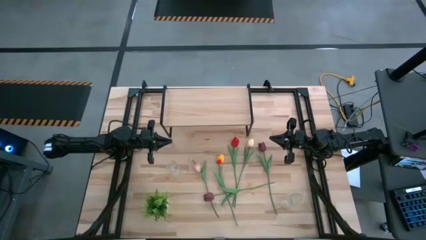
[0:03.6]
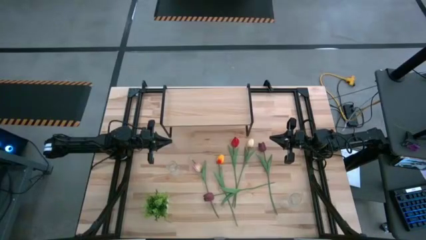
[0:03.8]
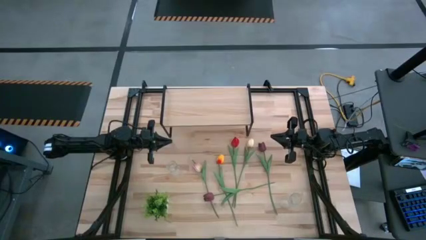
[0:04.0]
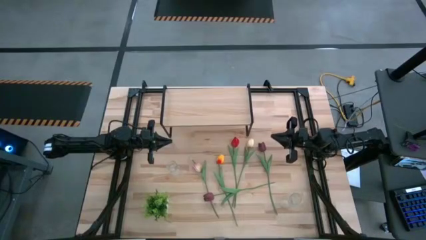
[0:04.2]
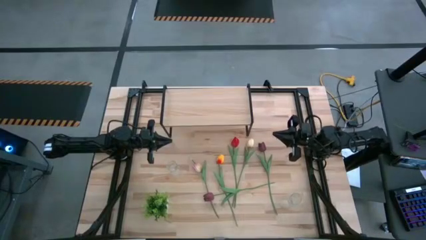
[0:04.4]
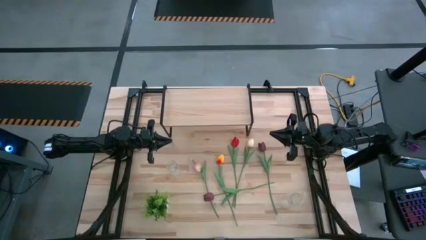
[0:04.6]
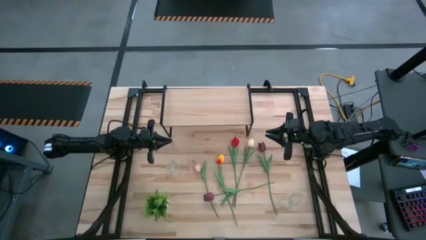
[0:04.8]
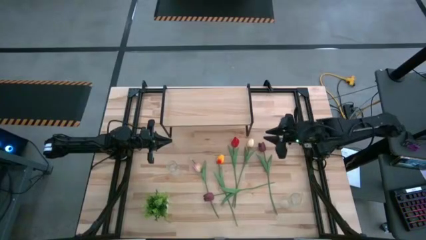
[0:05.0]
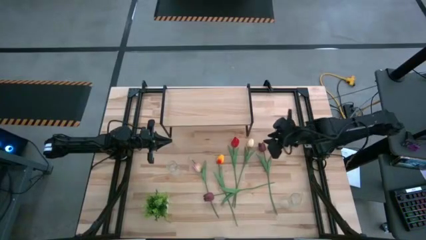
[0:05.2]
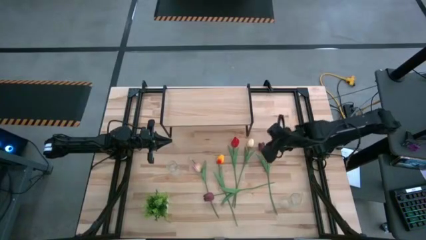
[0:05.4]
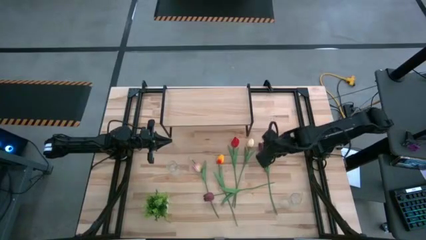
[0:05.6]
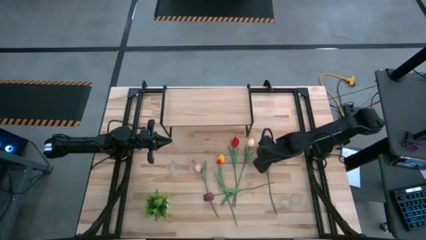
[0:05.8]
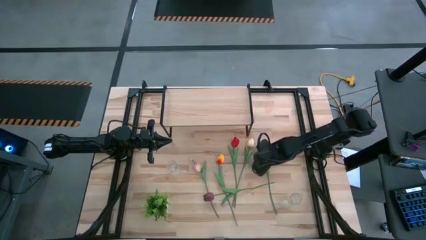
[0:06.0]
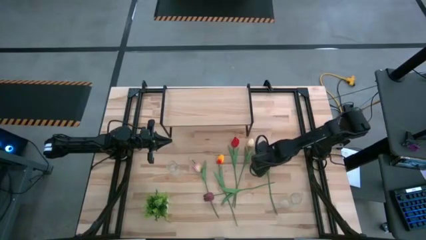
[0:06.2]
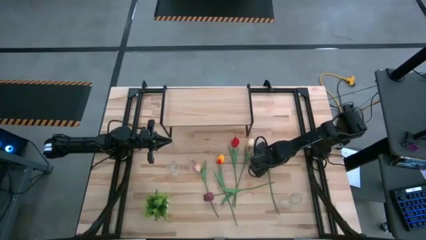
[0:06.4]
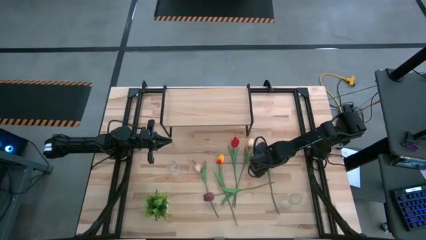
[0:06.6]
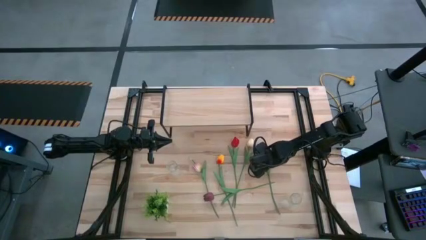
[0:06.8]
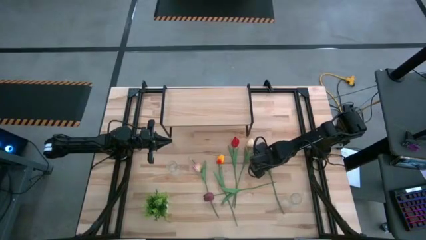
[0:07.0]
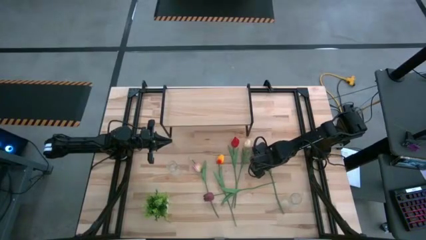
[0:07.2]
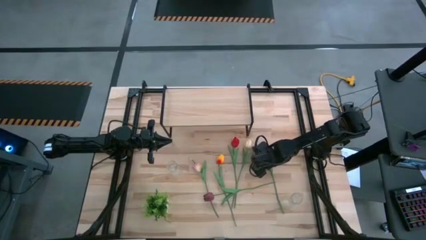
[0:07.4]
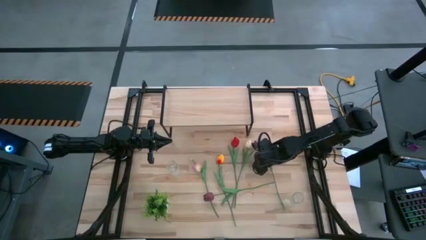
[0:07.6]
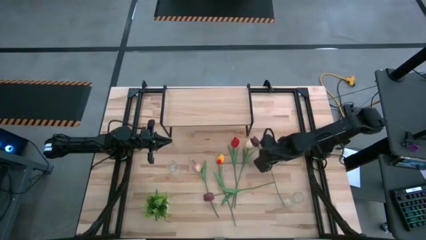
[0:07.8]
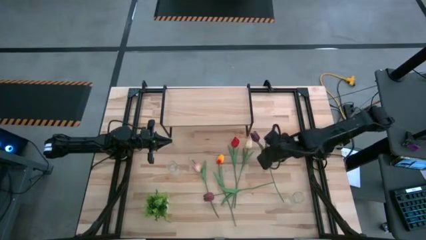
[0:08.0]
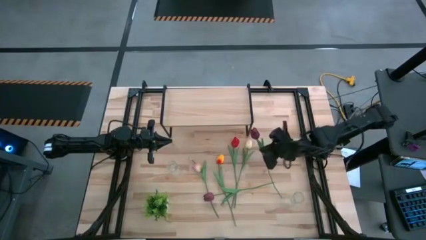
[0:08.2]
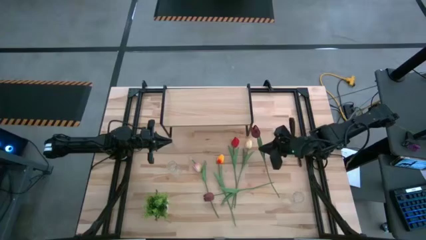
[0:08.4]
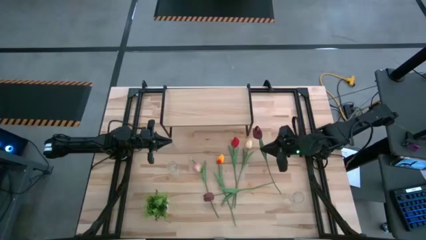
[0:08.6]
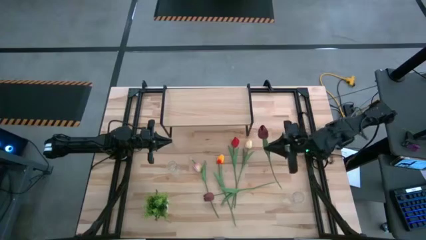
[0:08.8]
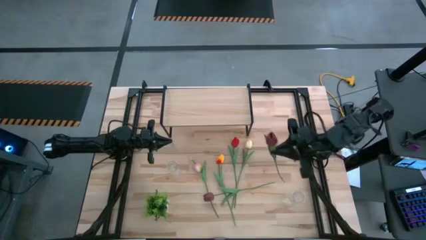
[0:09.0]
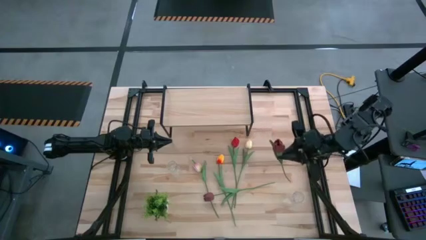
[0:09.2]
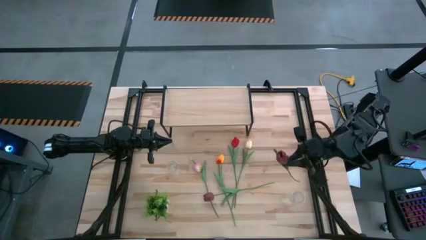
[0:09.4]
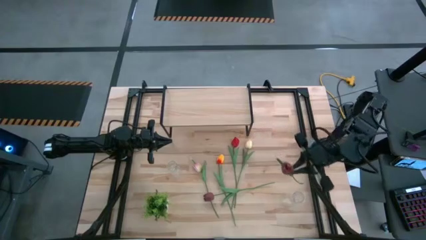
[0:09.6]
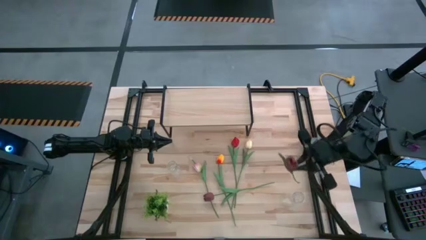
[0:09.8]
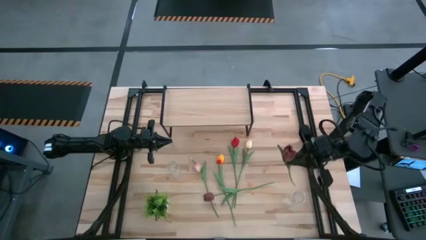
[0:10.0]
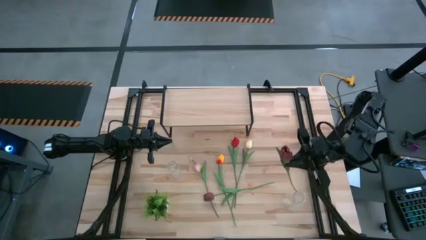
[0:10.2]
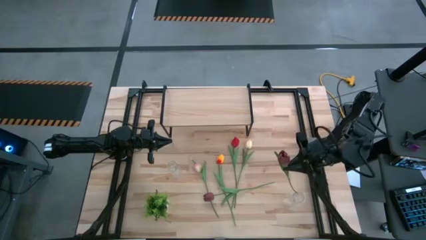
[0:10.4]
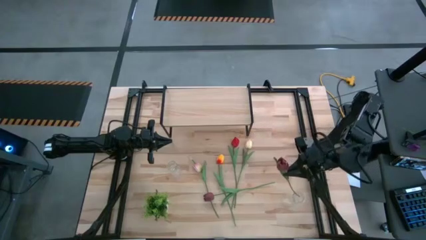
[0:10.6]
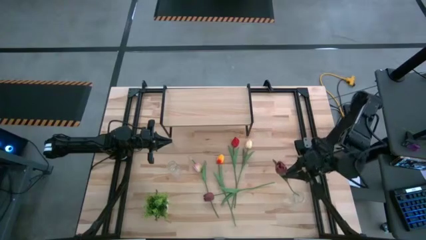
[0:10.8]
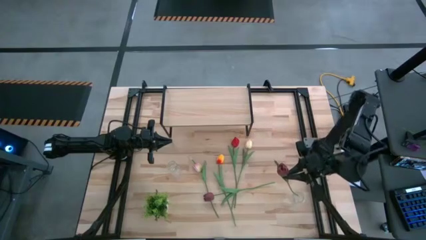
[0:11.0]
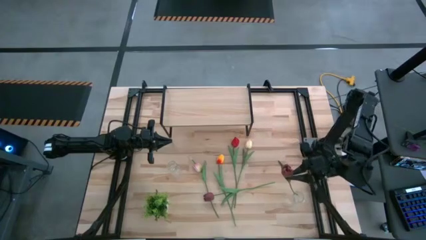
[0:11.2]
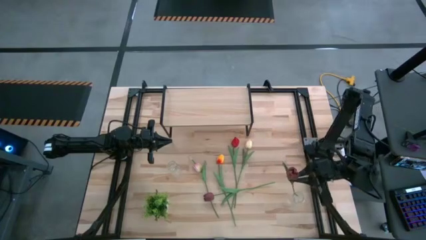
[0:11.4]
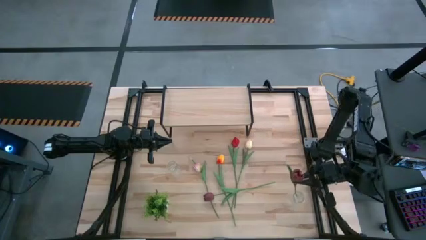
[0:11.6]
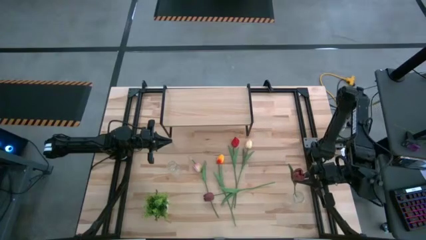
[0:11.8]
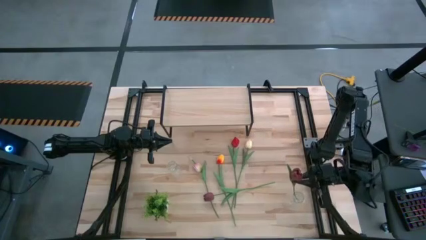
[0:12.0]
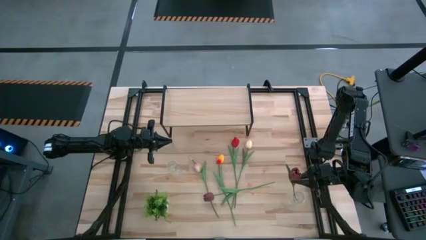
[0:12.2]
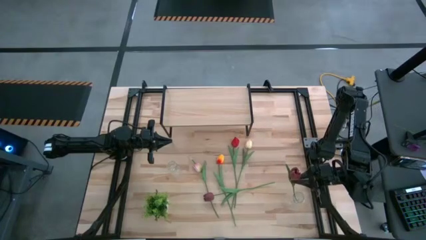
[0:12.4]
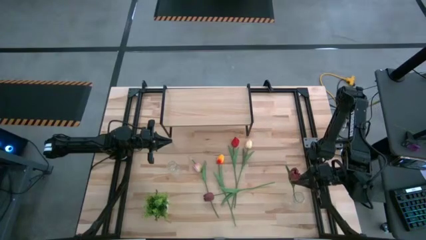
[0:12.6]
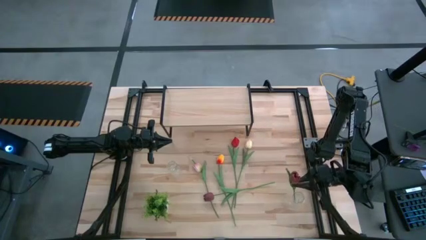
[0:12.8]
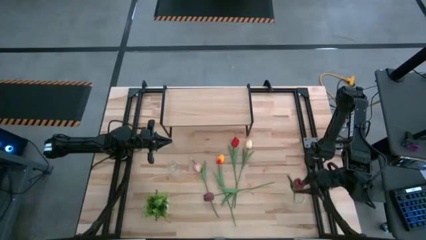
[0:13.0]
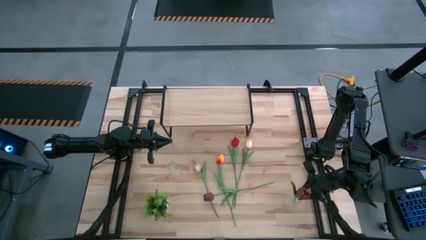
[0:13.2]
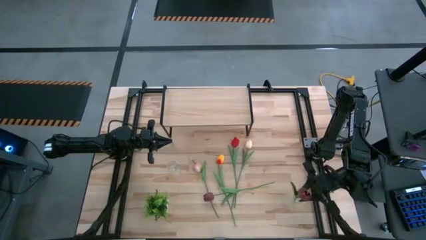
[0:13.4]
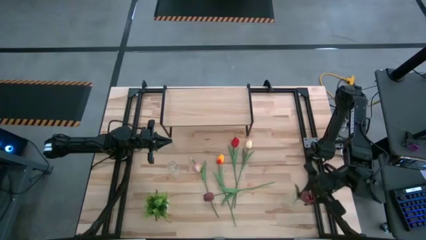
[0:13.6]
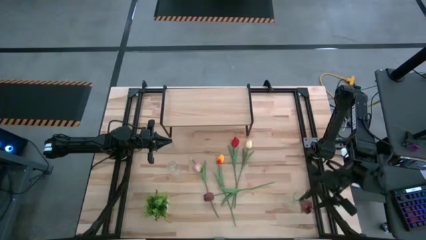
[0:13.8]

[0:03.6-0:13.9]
Task: Pick and place flowers into a vace then onto a shelf
Put the top dark red flower into the right transparent flower vase

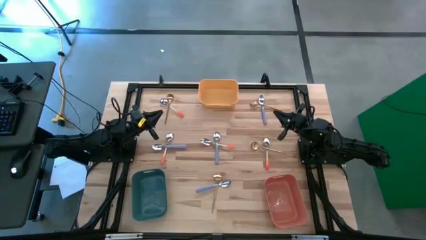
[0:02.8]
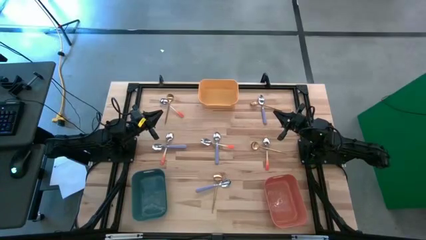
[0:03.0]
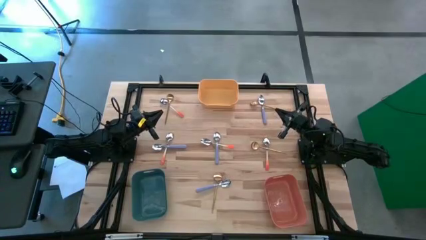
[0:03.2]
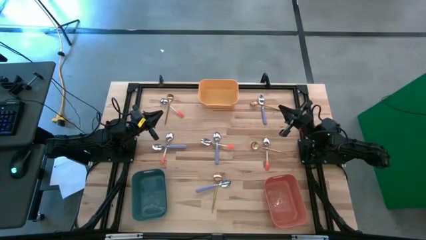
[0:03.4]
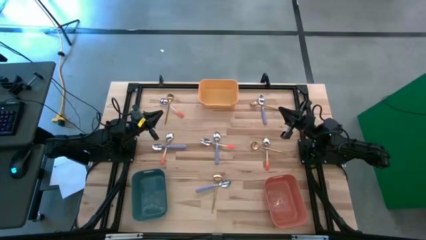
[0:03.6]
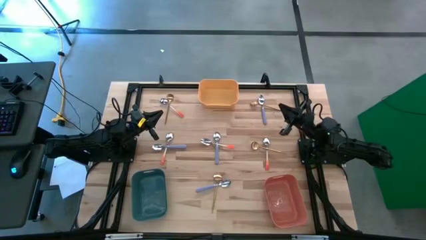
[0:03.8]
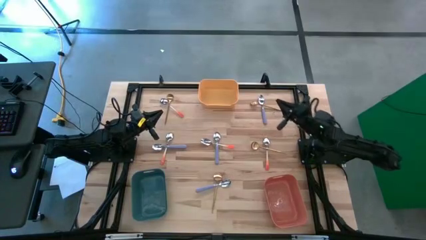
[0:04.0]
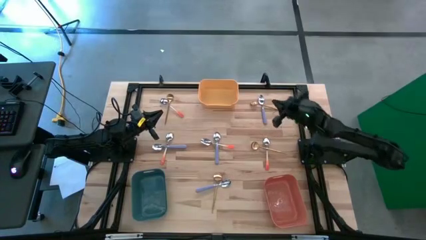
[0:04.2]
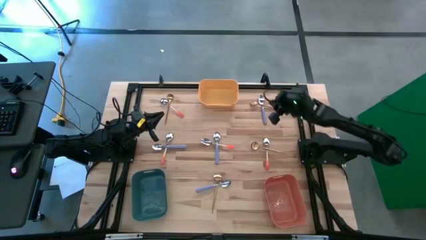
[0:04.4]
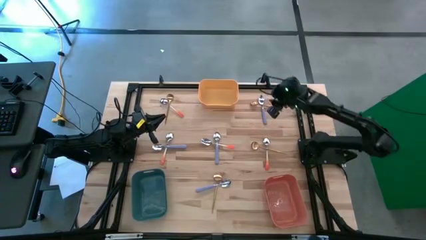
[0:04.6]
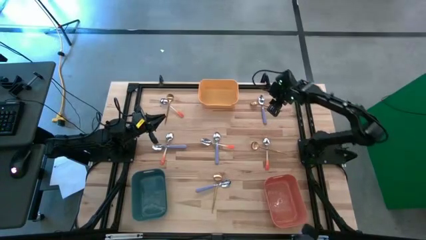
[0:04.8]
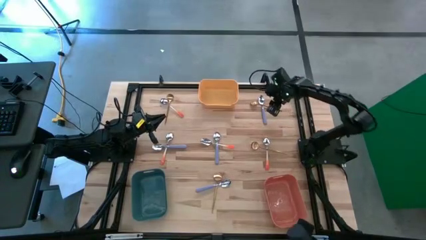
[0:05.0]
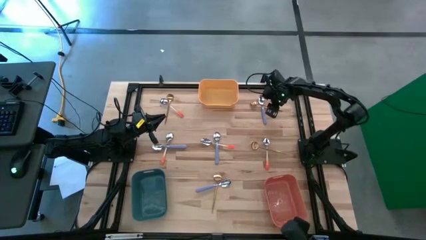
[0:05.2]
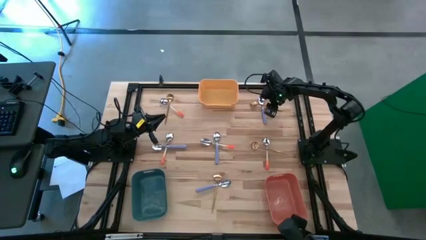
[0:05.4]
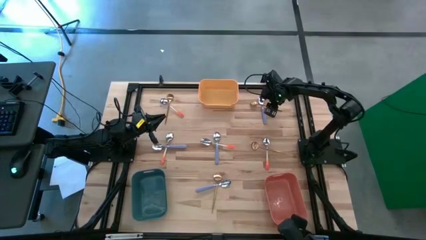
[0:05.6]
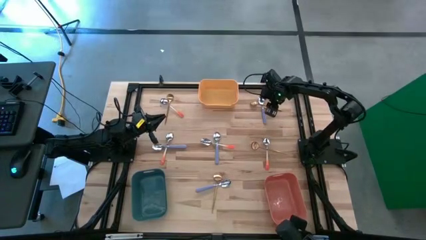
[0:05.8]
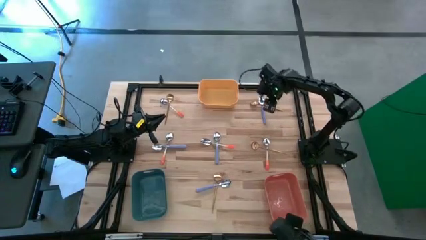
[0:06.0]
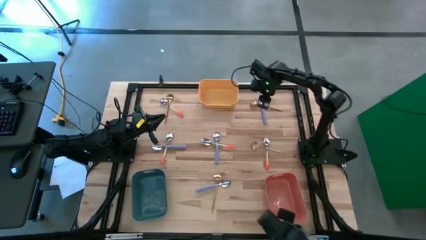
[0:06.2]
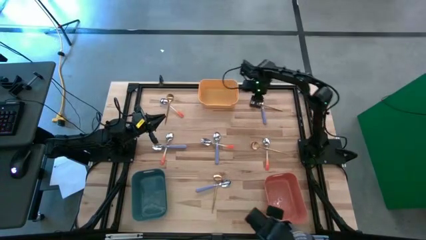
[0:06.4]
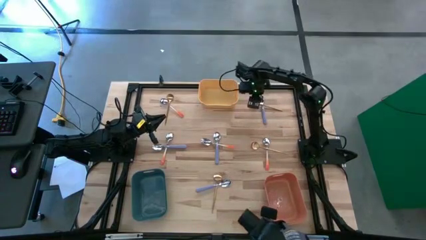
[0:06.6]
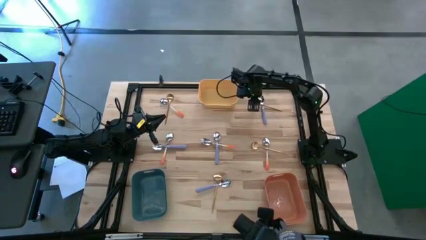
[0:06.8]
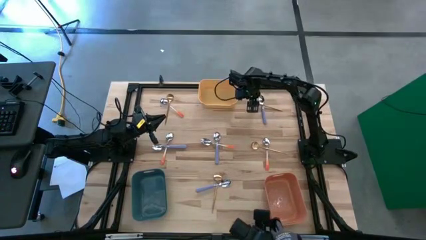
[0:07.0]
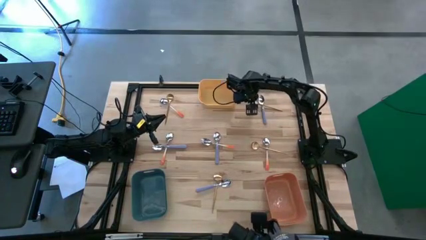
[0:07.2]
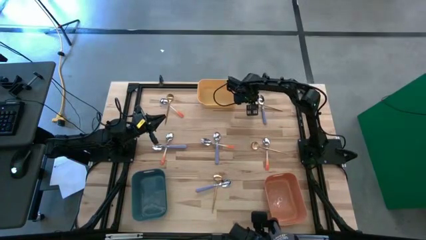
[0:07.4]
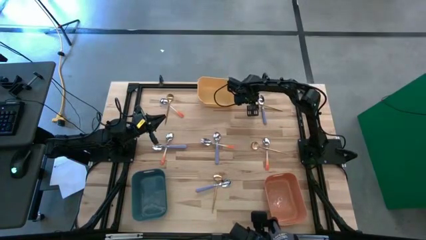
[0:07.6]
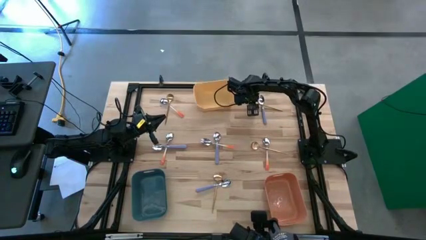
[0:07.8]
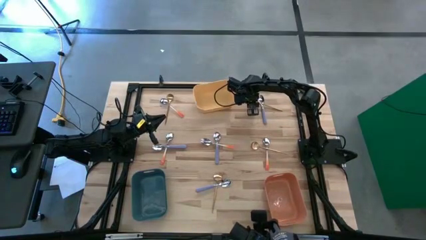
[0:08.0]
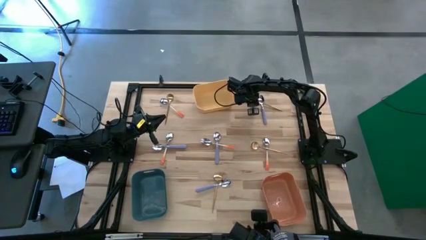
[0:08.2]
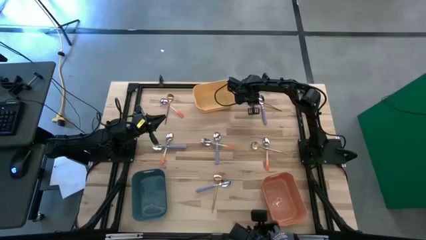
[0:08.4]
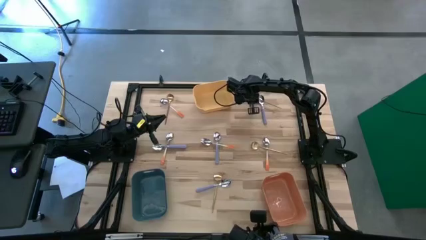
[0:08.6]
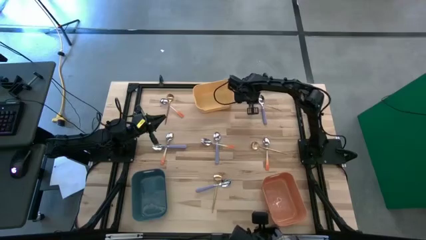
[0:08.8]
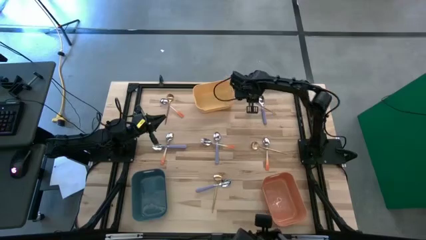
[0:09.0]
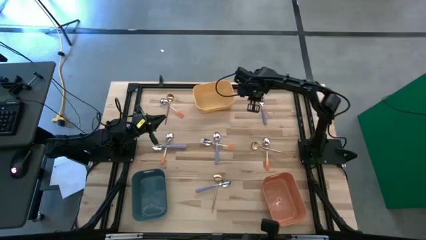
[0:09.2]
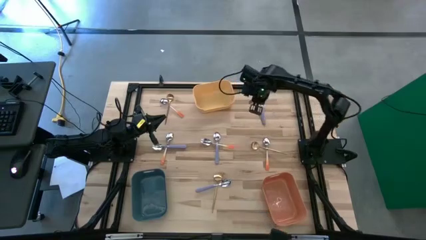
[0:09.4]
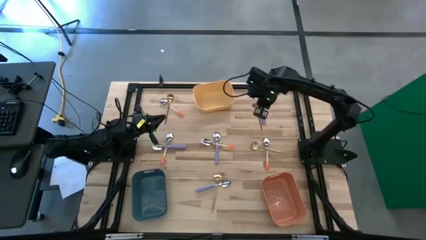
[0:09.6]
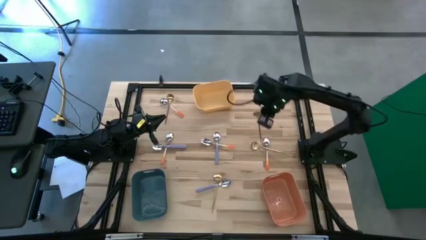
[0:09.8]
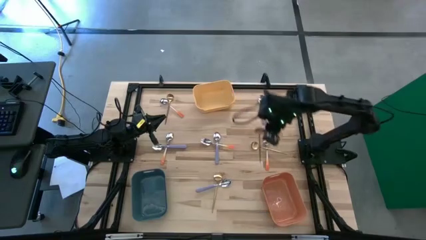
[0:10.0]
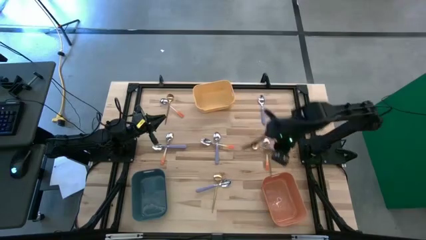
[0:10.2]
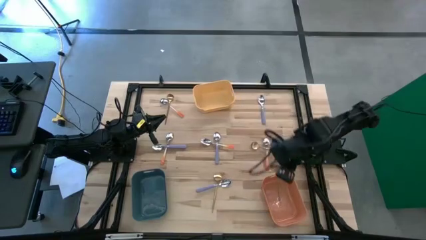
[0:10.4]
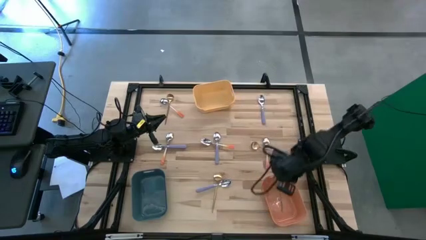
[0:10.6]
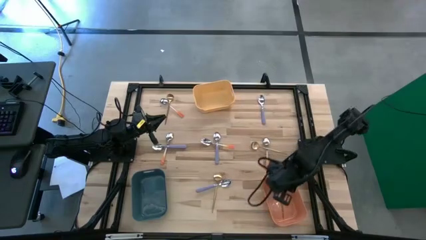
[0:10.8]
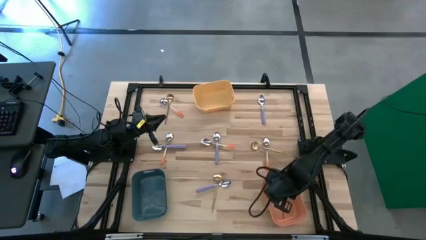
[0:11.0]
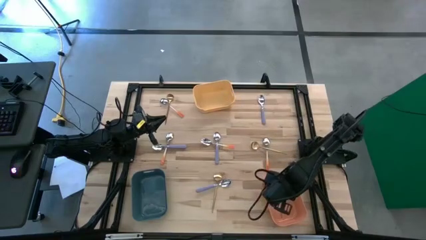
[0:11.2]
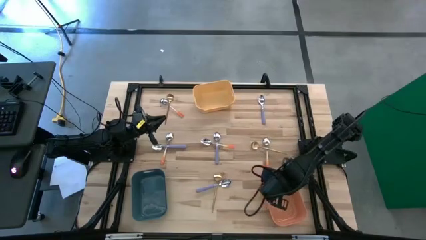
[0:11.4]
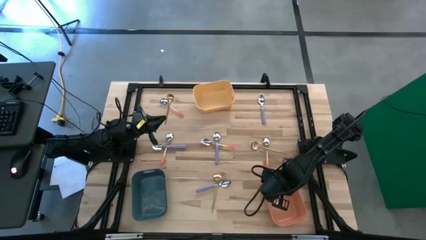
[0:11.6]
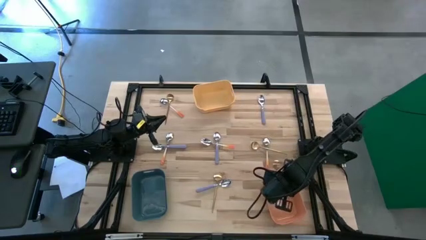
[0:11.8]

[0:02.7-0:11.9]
Task: Sort silverware by color (type)
Put the top right golden spoon into the orange bin
